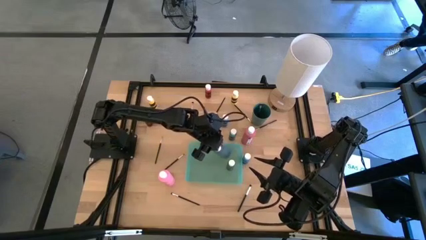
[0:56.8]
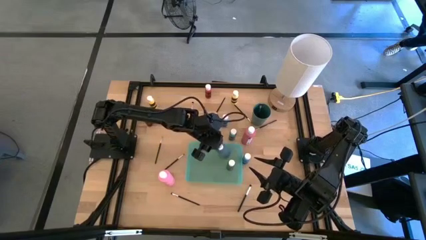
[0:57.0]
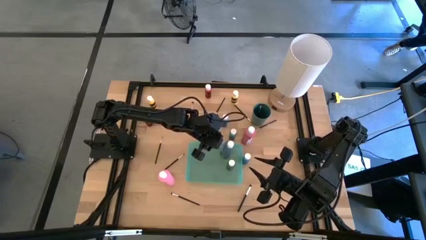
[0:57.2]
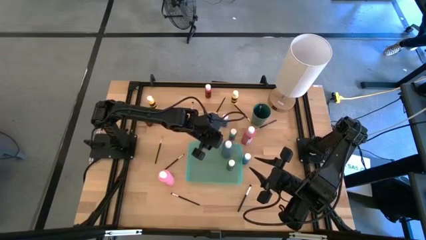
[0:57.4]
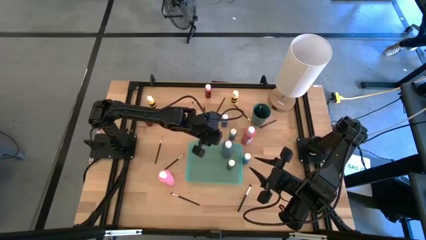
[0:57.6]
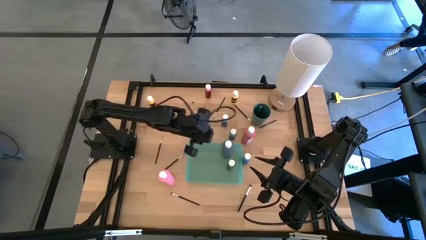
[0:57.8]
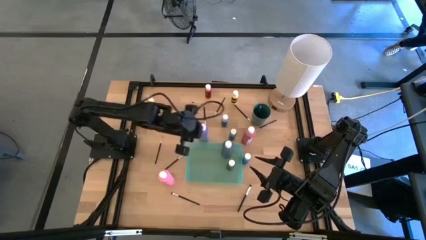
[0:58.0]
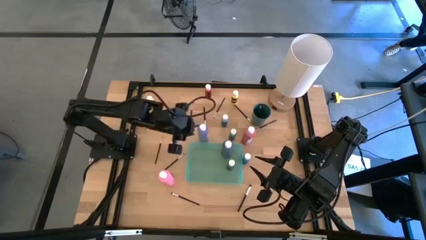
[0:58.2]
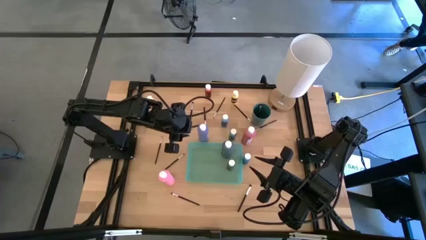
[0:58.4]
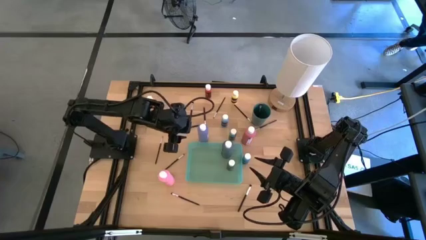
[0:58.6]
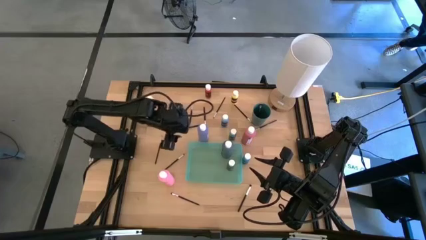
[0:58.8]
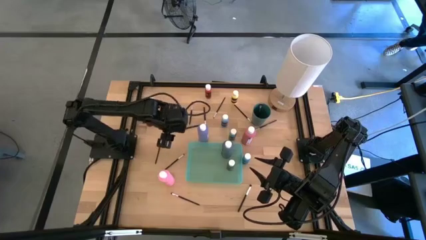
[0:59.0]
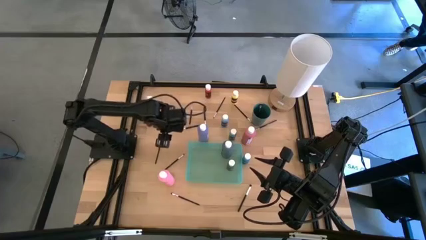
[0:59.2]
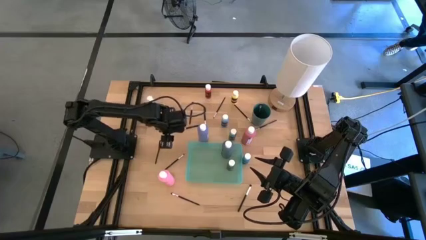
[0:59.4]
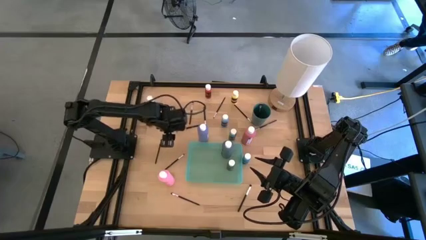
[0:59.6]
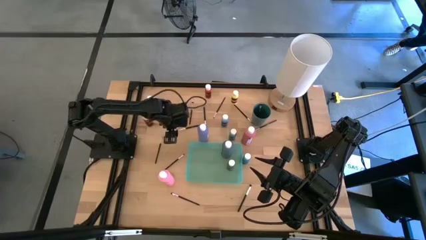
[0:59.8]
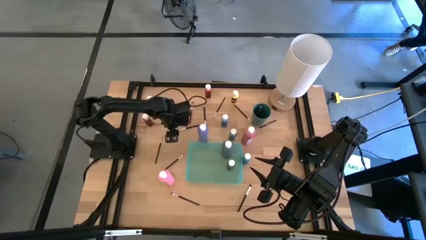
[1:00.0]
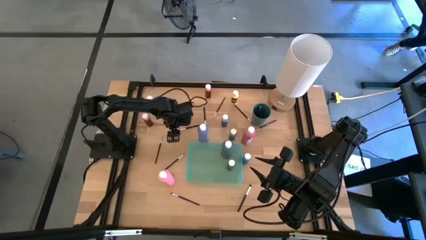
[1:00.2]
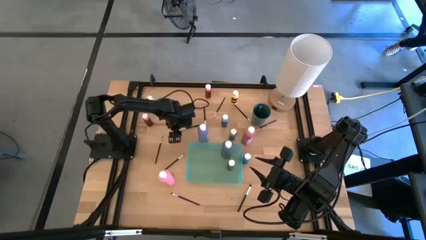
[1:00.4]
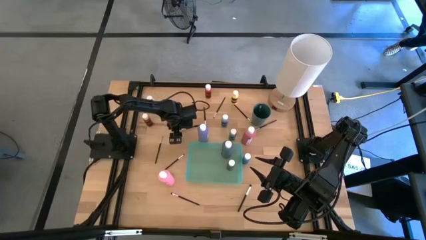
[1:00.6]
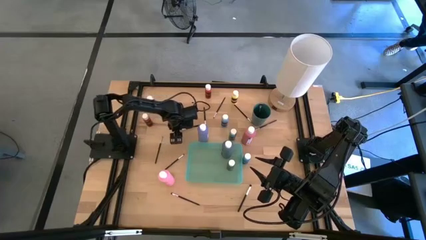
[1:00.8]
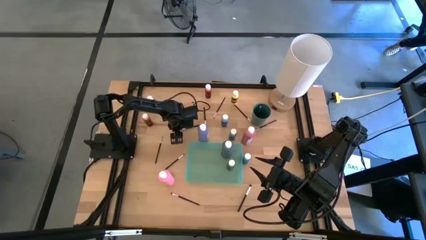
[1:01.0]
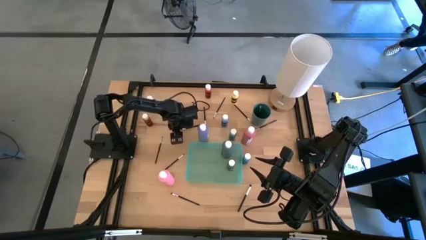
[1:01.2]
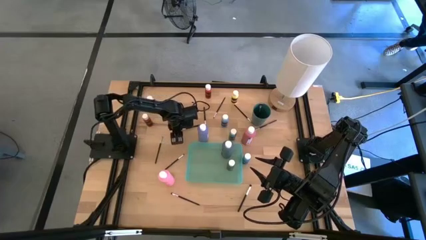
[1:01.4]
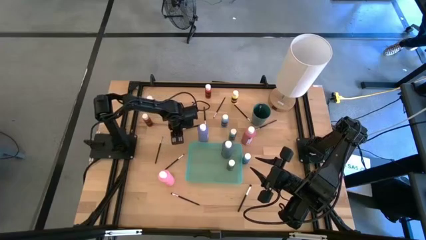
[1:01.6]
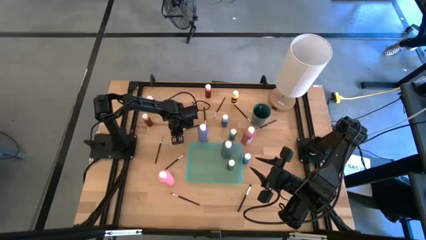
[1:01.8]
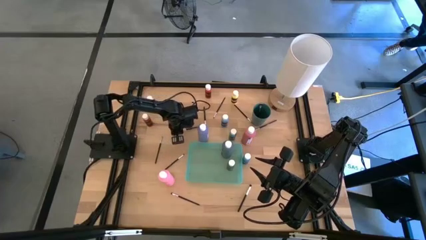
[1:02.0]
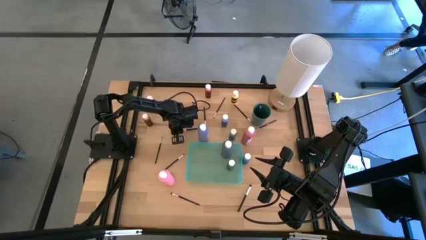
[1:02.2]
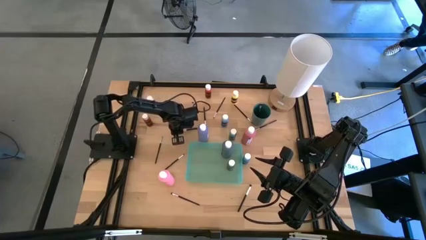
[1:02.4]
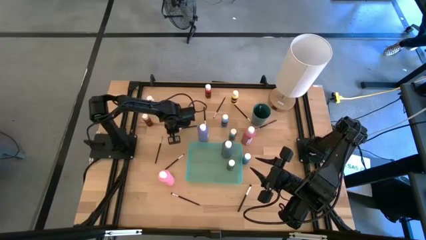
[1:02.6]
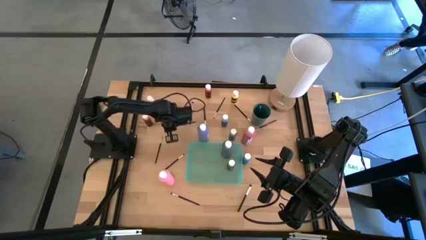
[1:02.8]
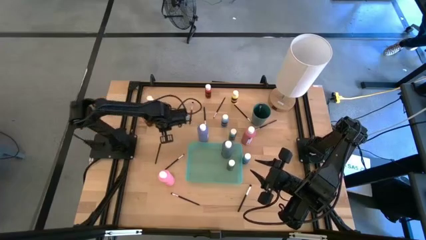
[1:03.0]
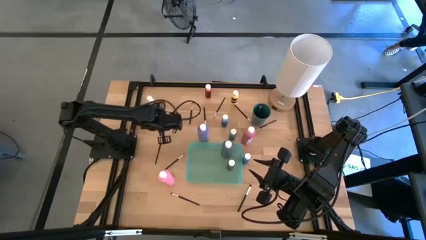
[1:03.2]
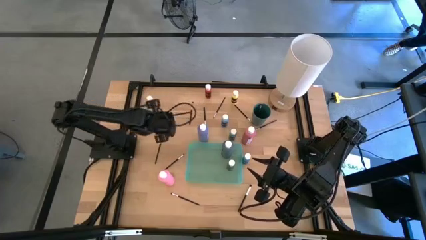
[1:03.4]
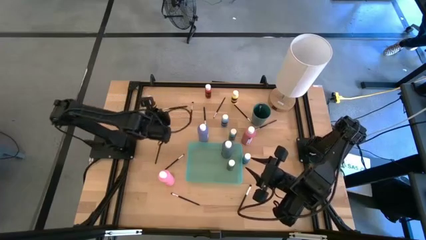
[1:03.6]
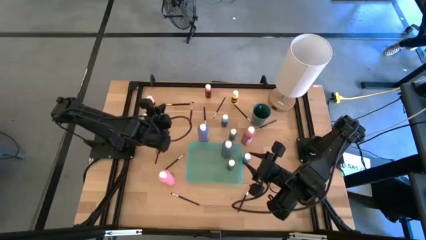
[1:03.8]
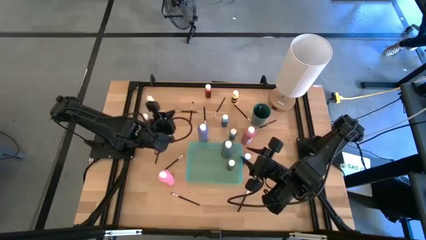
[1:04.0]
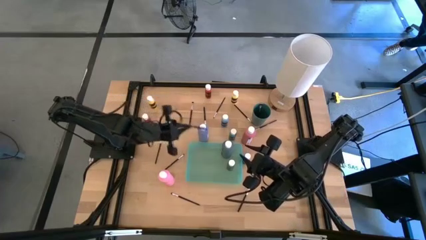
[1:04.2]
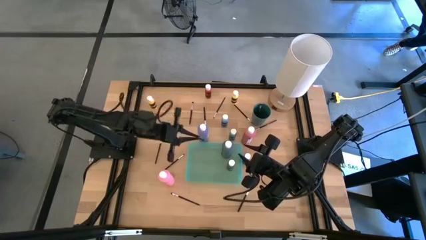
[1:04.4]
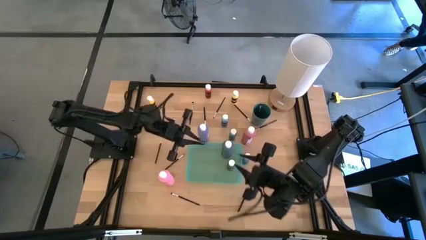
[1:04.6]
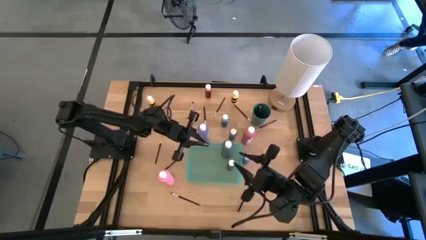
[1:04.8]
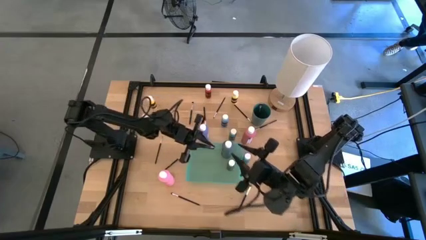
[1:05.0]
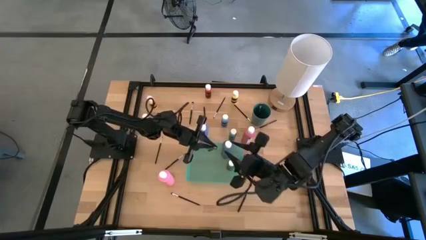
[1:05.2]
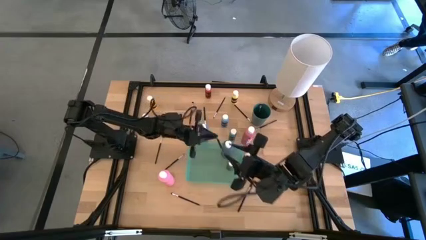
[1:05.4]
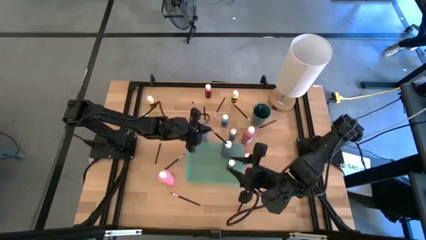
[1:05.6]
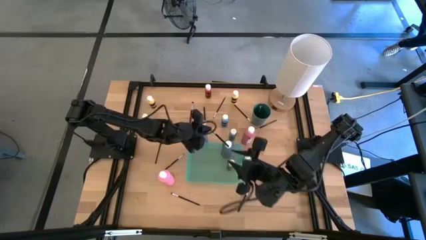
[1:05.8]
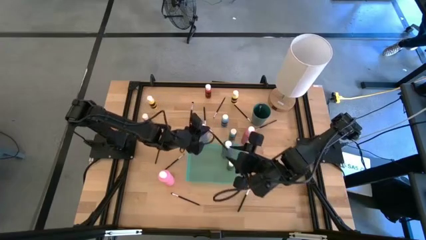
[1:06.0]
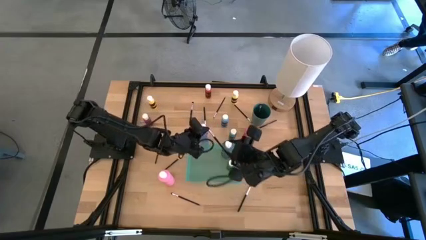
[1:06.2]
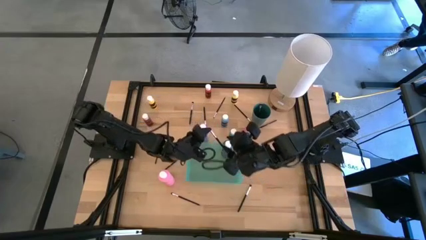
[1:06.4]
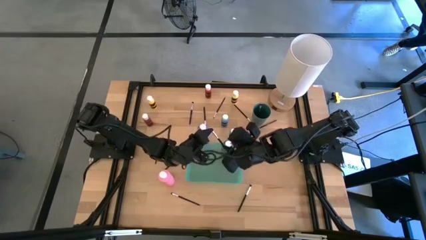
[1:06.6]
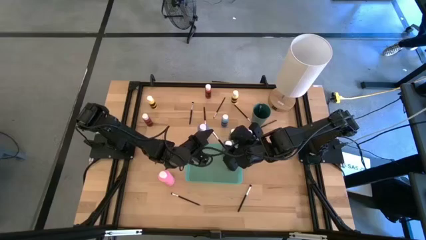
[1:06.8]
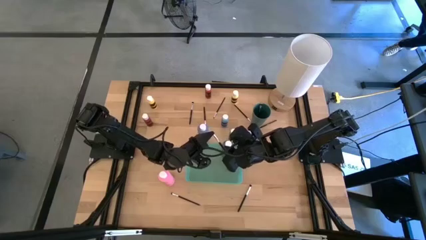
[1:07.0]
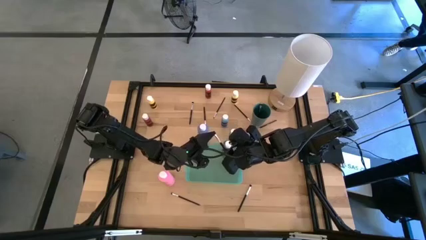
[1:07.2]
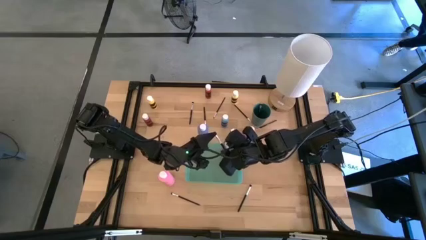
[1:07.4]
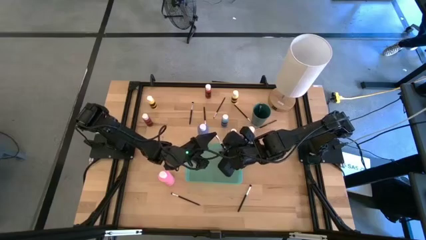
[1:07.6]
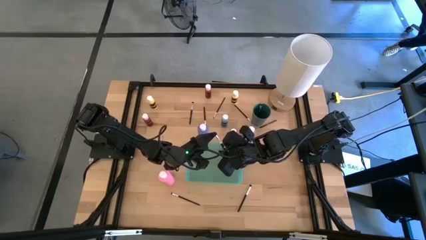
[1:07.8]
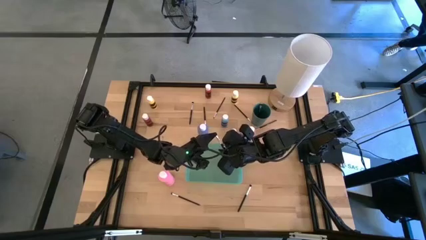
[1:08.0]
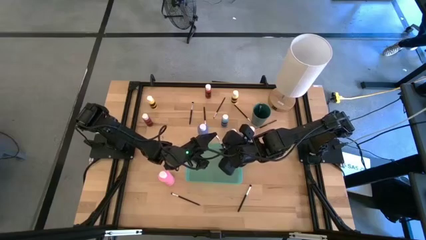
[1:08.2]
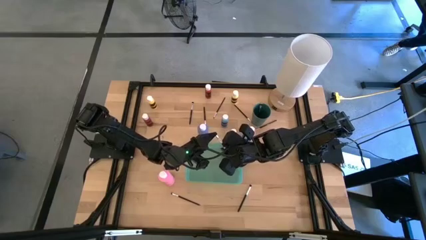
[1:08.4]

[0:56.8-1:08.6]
Task: Pick & Place Paint Supplies
Put the black eyeshadow brush into the green cup
